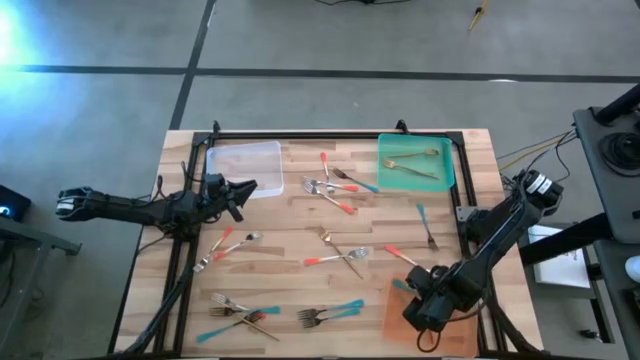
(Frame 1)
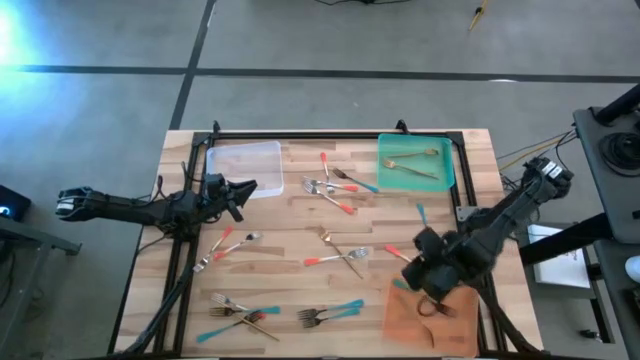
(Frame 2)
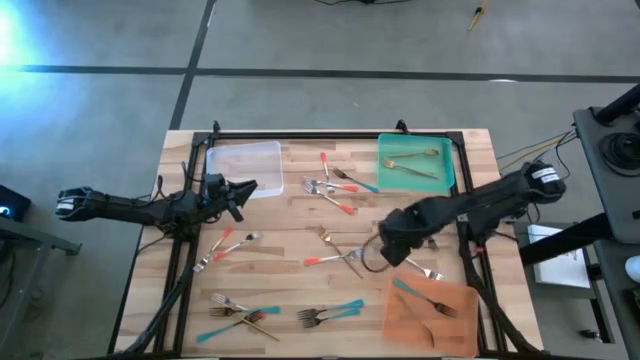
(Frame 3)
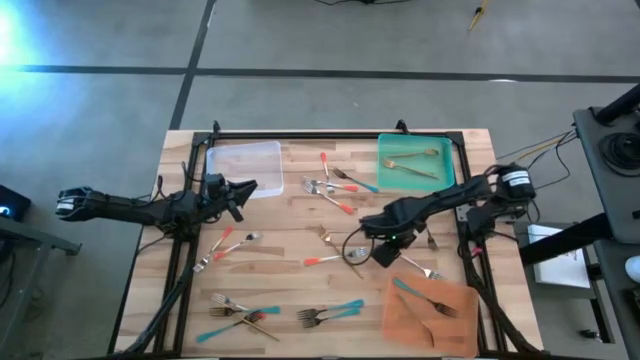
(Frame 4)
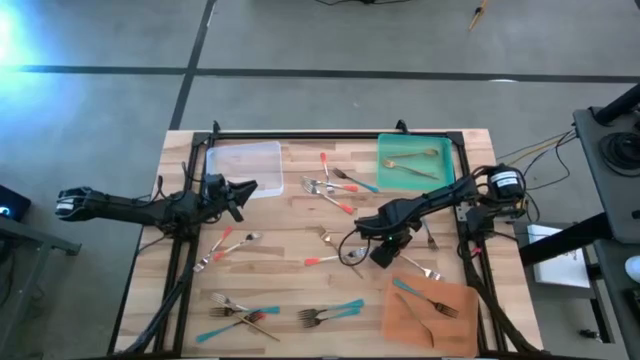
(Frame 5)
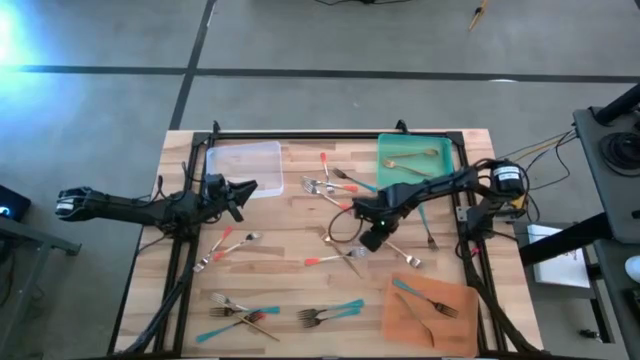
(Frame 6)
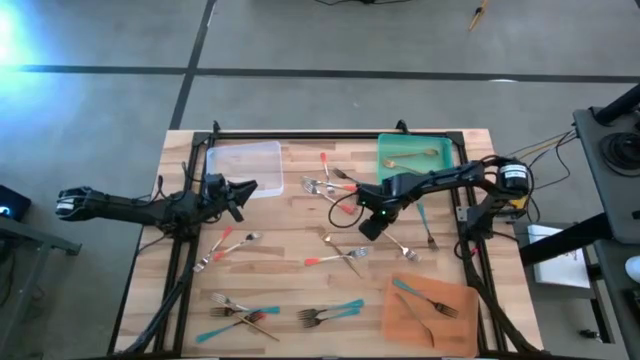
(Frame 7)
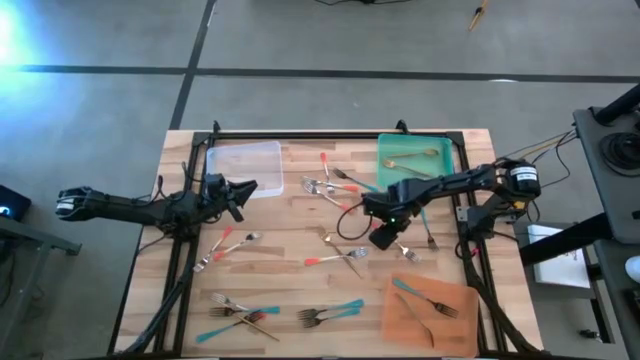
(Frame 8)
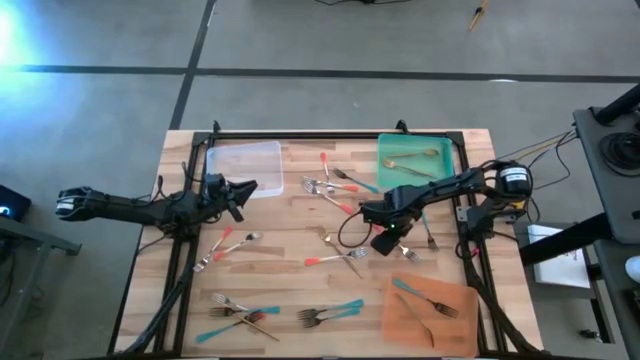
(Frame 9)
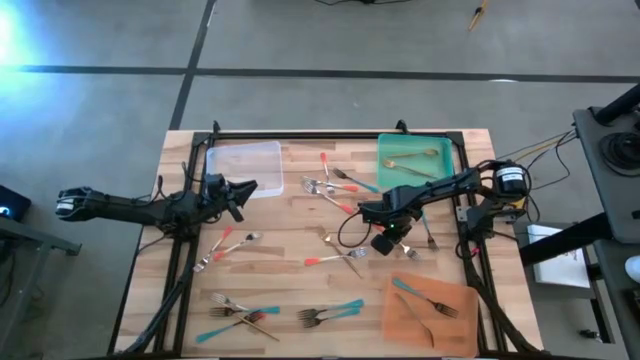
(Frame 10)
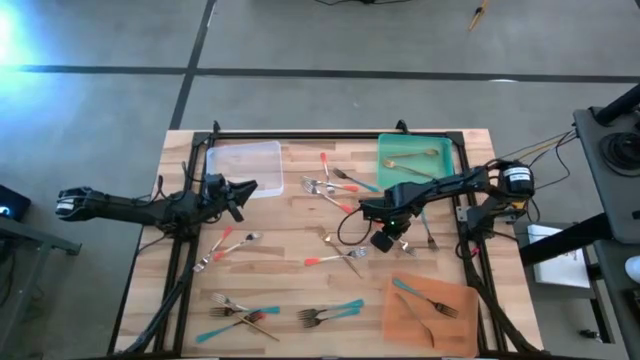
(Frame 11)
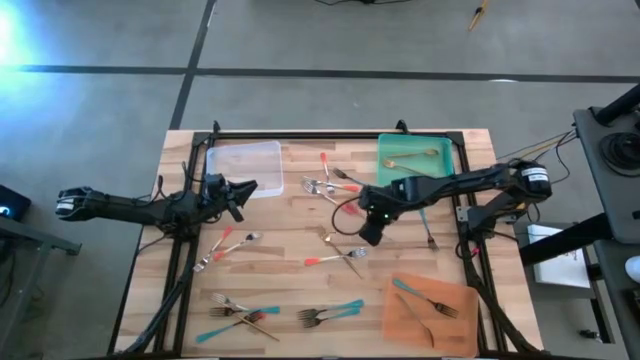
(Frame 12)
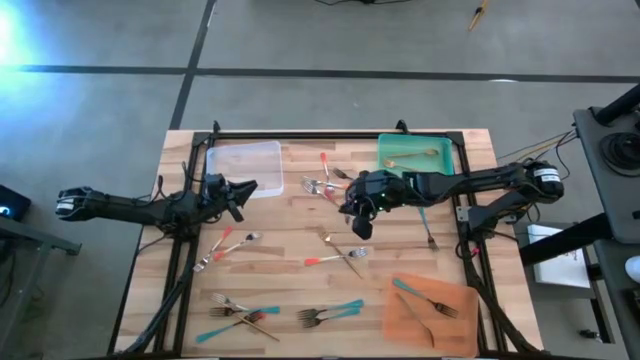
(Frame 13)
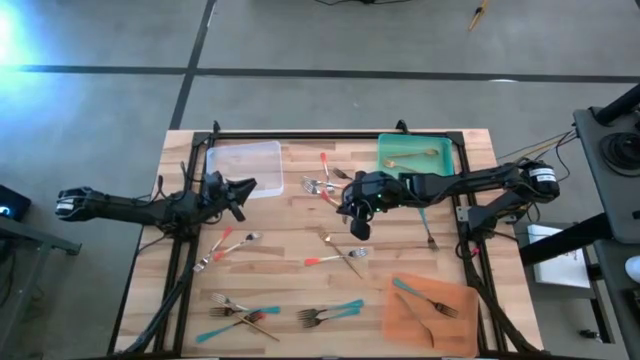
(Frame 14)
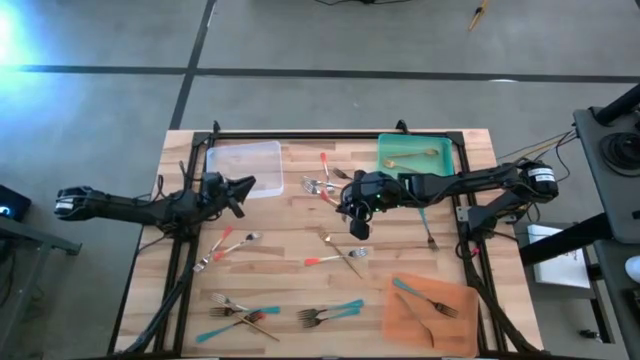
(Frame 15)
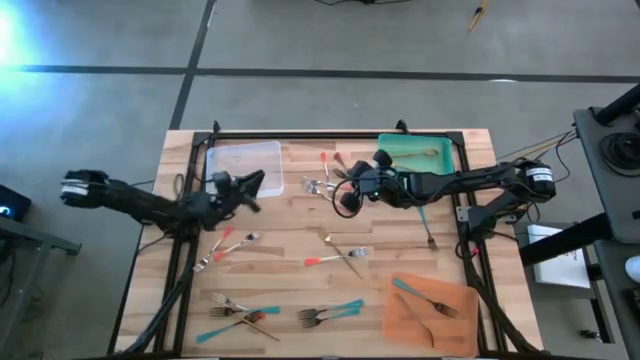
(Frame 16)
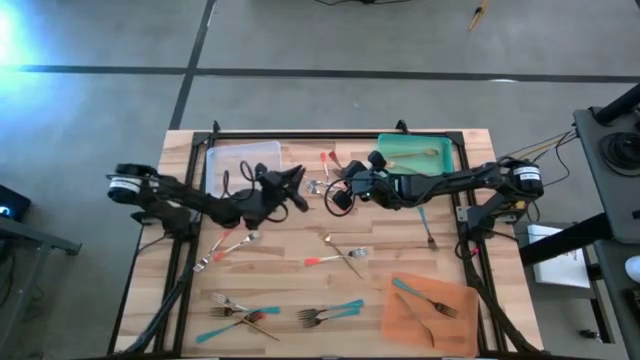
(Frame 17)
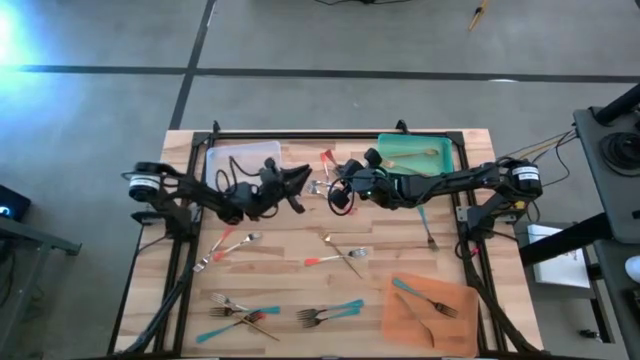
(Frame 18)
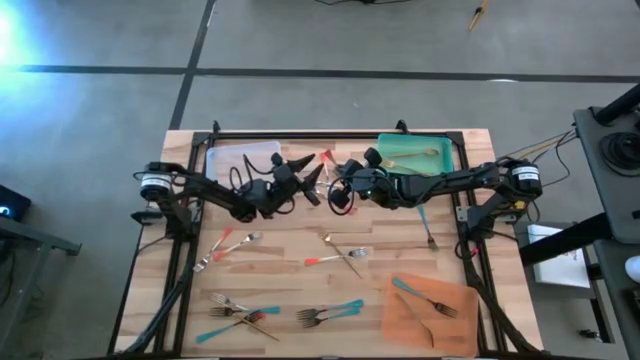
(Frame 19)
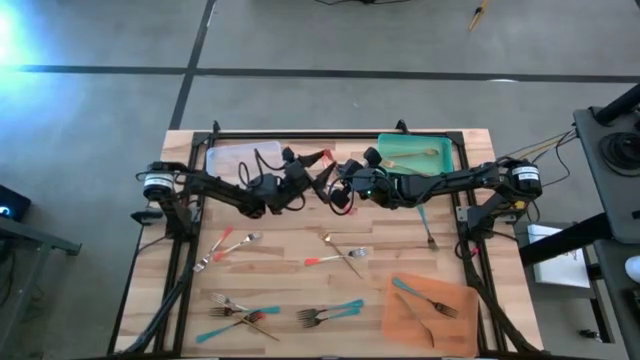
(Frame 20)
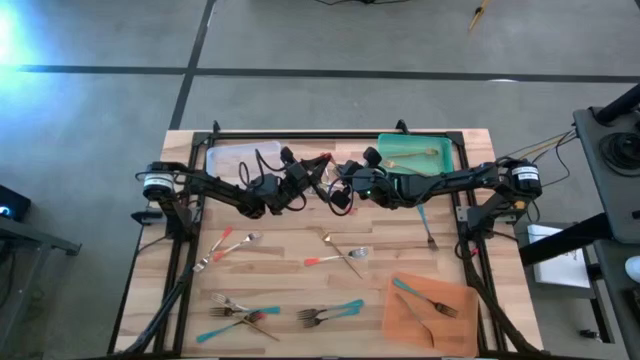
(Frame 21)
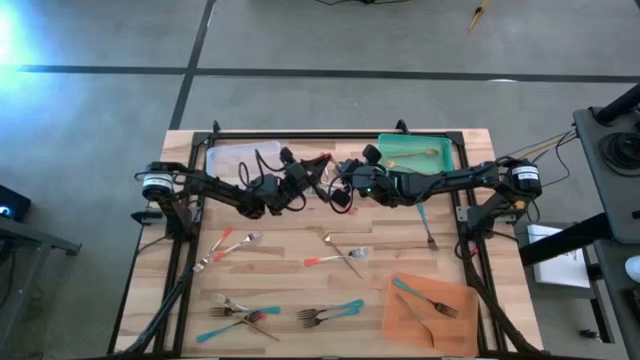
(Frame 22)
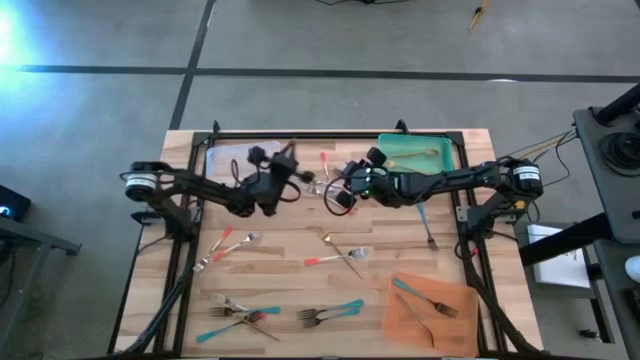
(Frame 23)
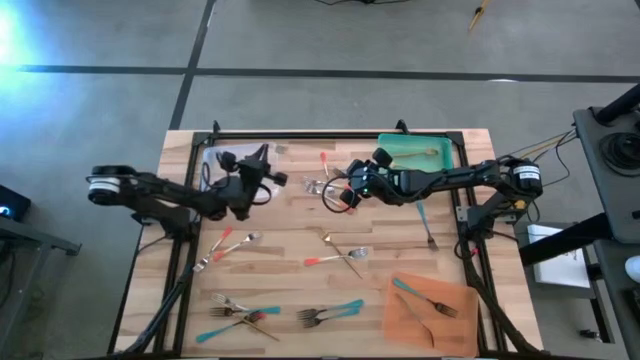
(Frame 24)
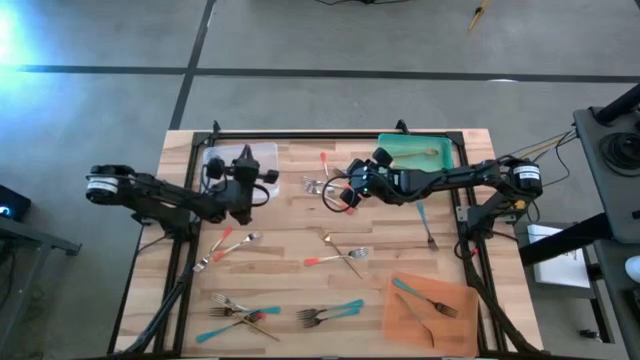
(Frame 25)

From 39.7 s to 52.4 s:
Task: Sort silverware by color (type)
Put the orange fork into the white bin

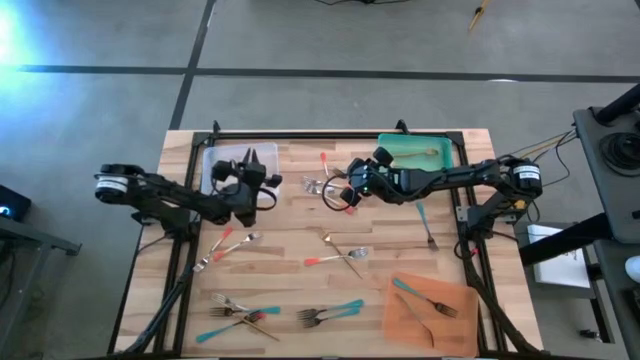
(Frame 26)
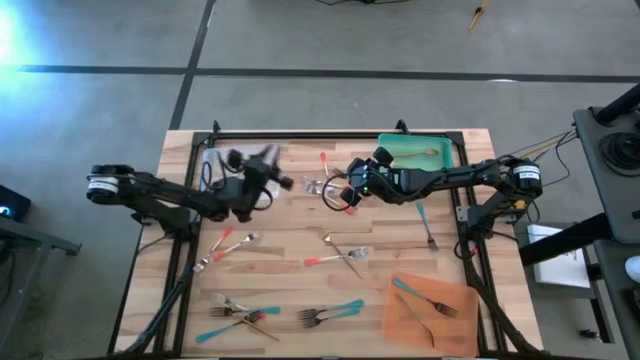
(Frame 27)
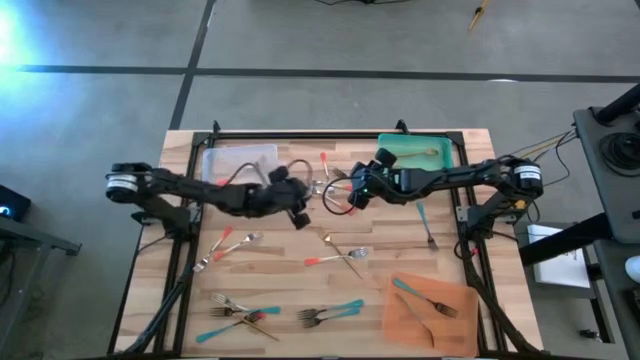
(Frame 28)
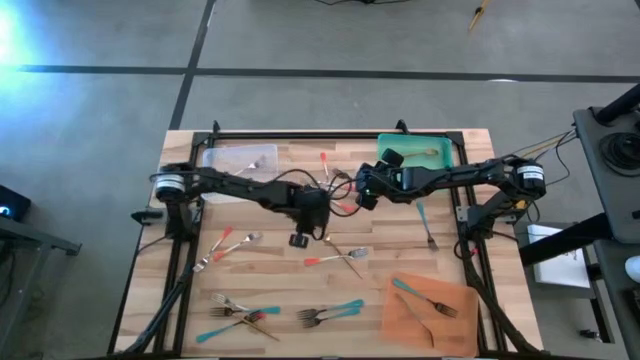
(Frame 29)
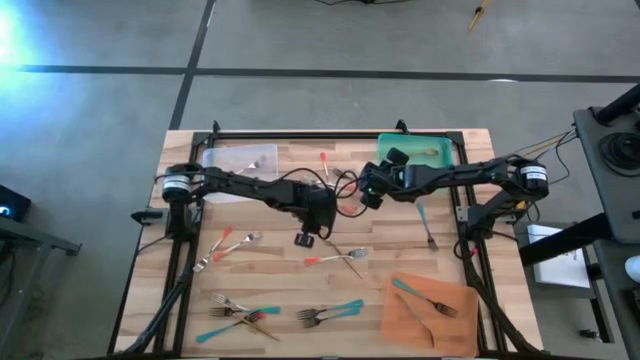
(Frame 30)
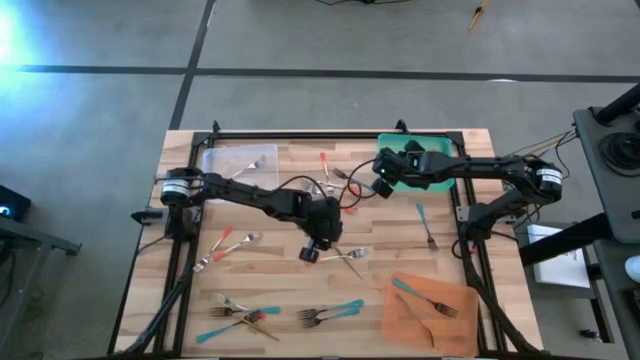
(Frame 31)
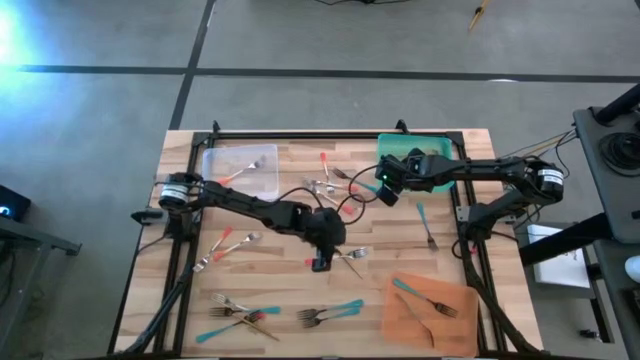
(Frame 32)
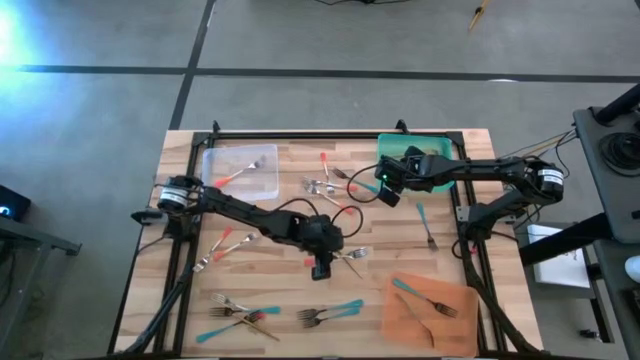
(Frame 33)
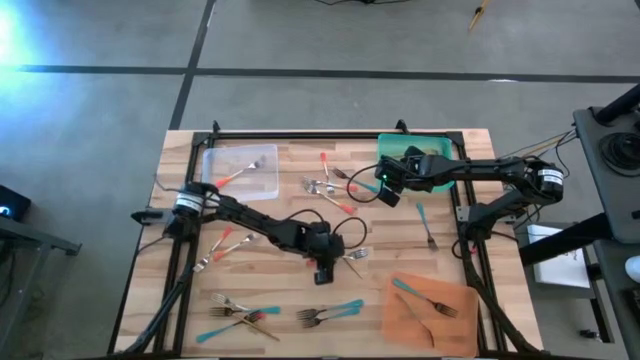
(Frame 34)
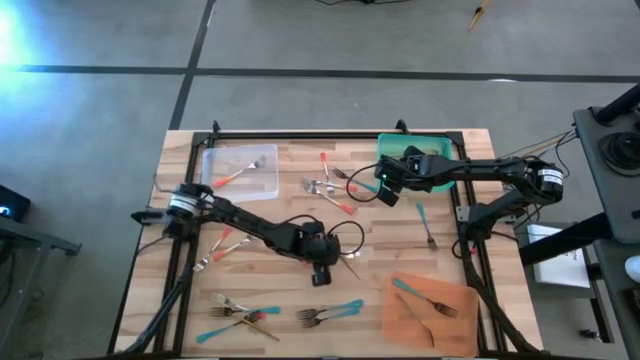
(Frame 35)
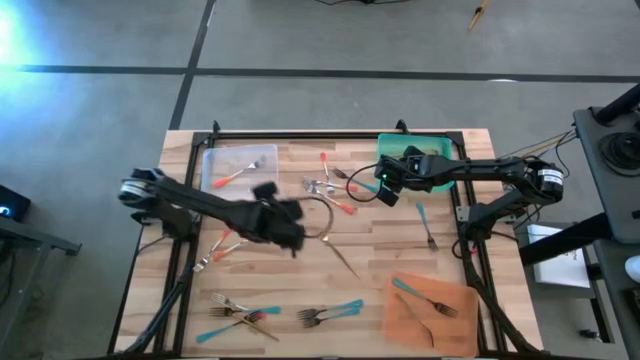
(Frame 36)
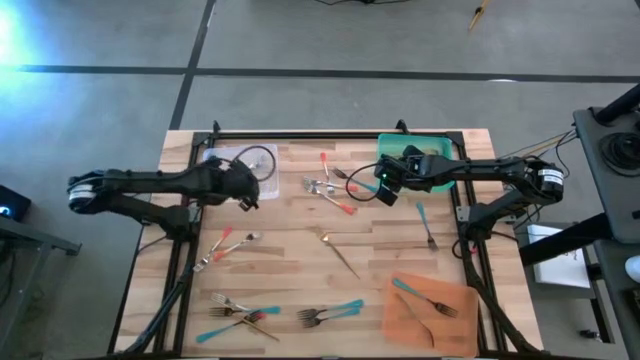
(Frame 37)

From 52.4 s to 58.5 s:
Put the orange fork into the white bin

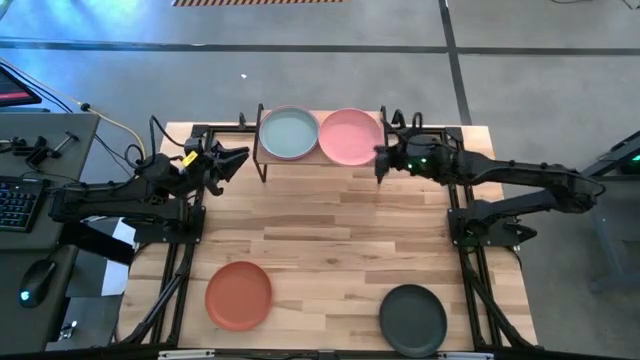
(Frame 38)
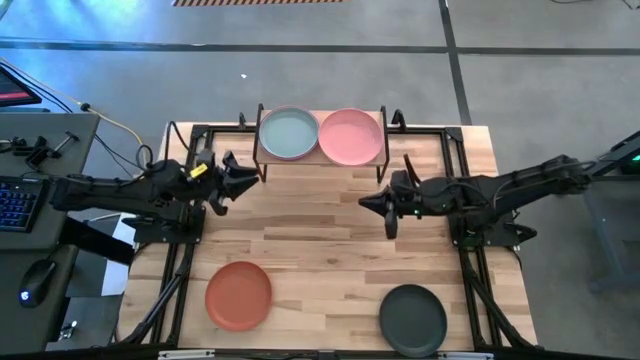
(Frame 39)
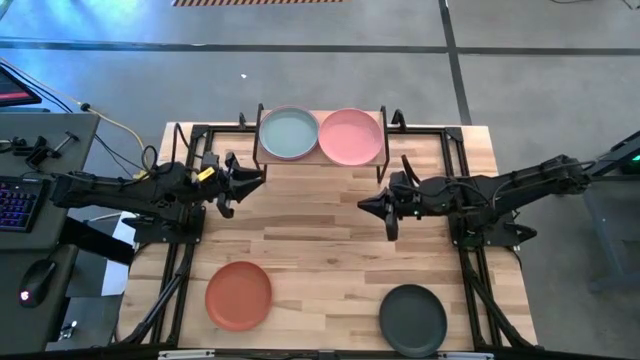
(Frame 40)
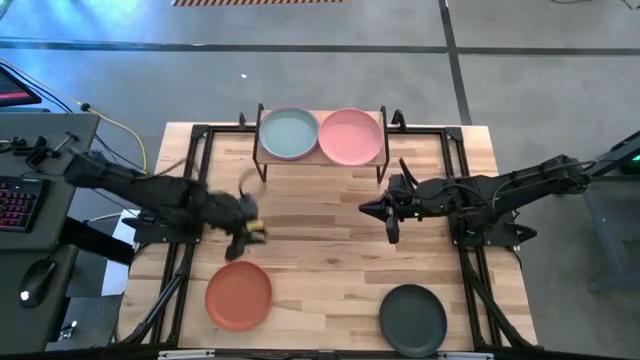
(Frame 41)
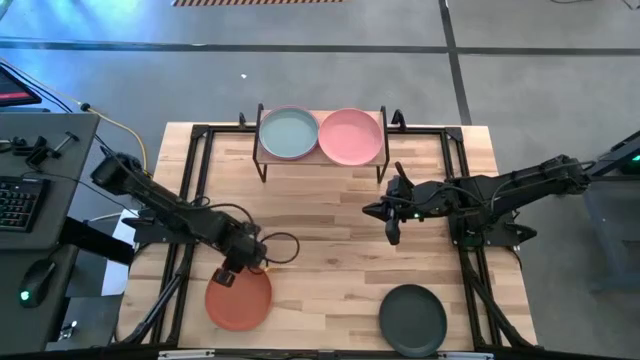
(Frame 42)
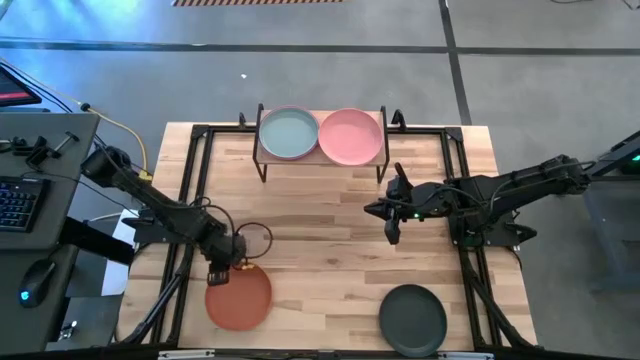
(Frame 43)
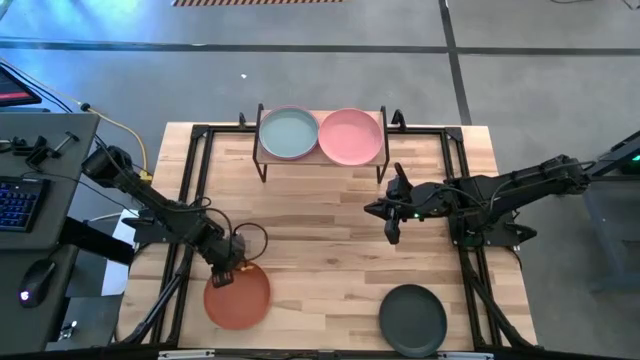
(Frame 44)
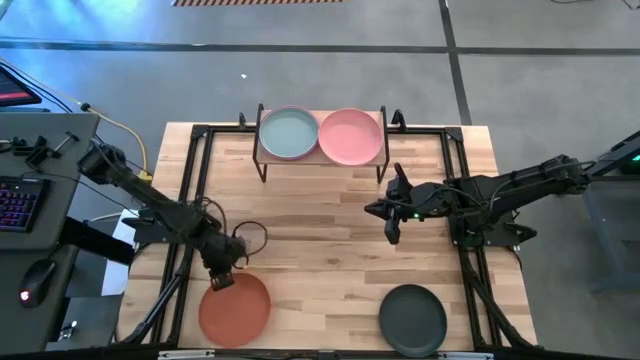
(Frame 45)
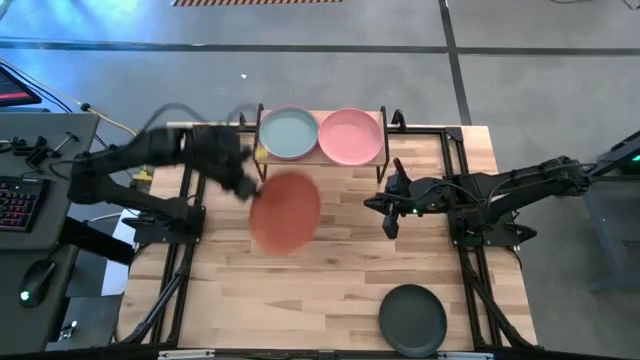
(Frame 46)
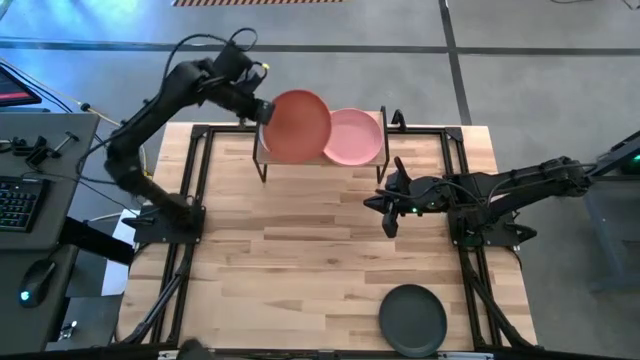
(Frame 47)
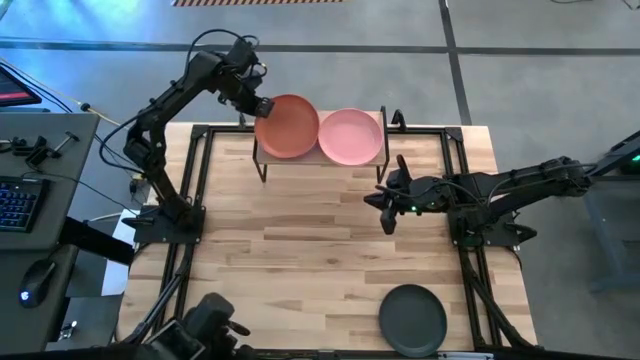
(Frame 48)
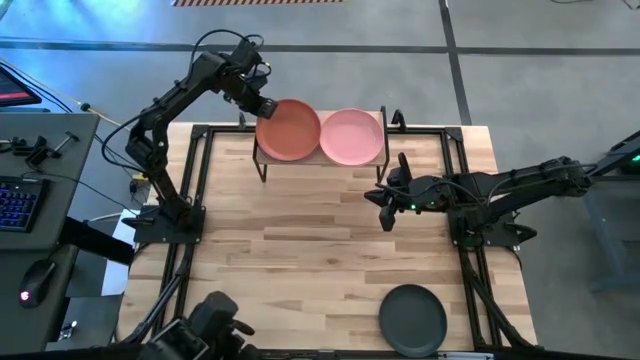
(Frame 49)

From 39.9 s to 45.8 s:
Task: Place and stack plates onto a shelf
Stack the orange plate on the blue plate on the shelf
